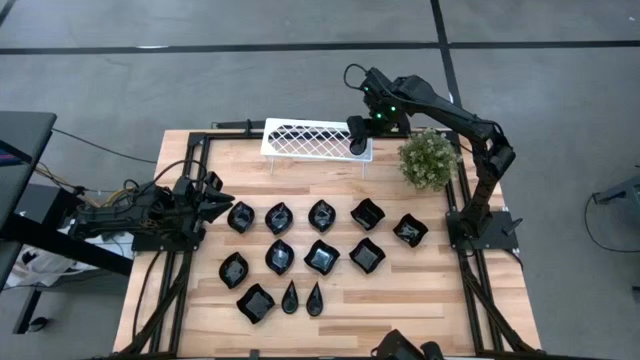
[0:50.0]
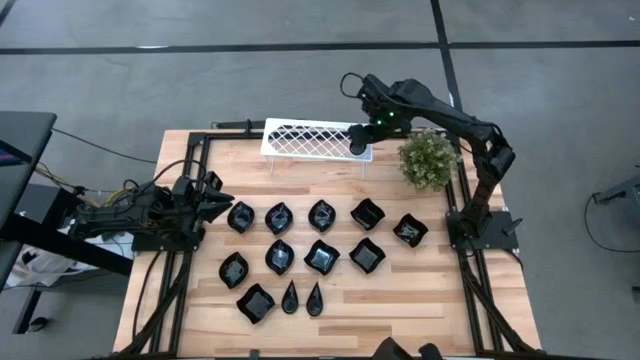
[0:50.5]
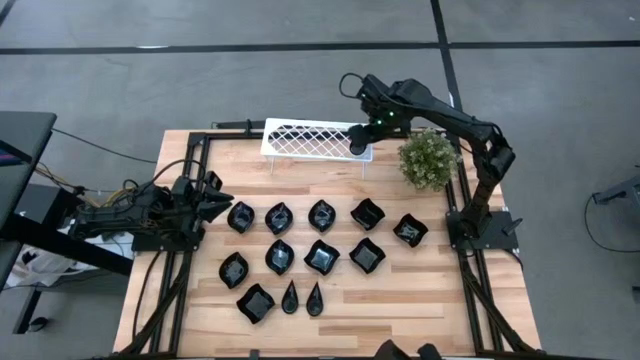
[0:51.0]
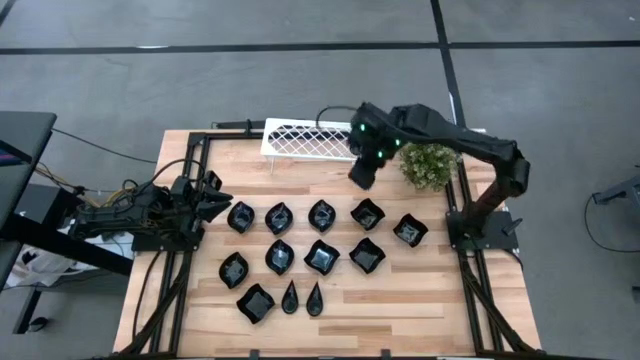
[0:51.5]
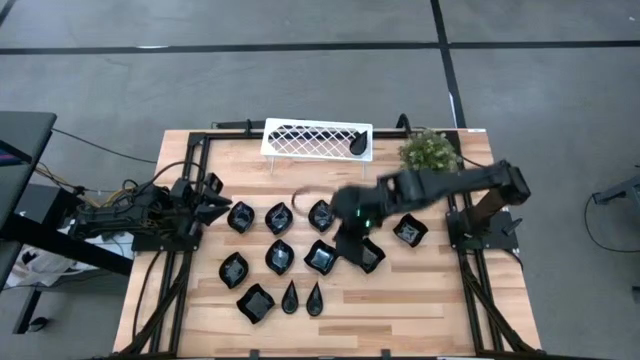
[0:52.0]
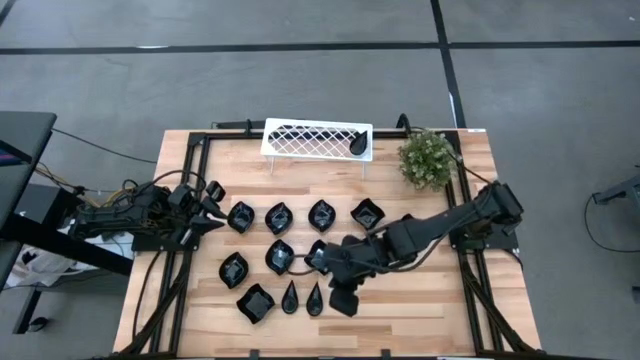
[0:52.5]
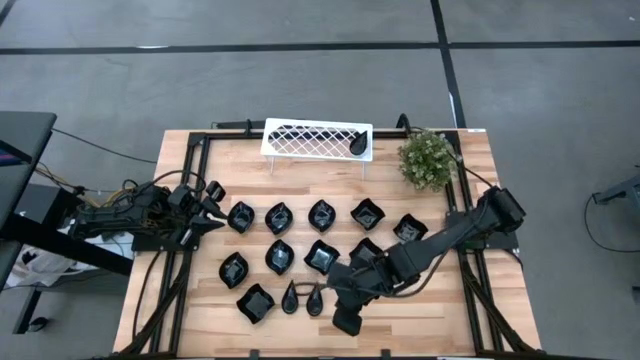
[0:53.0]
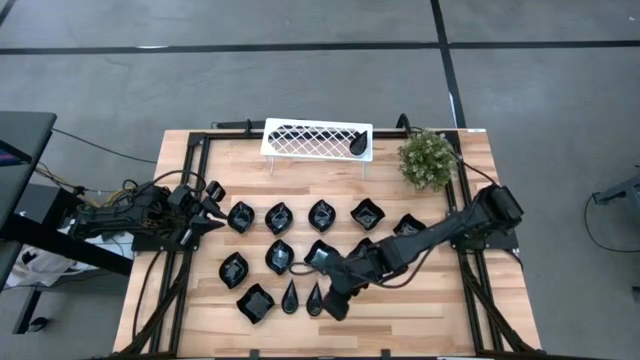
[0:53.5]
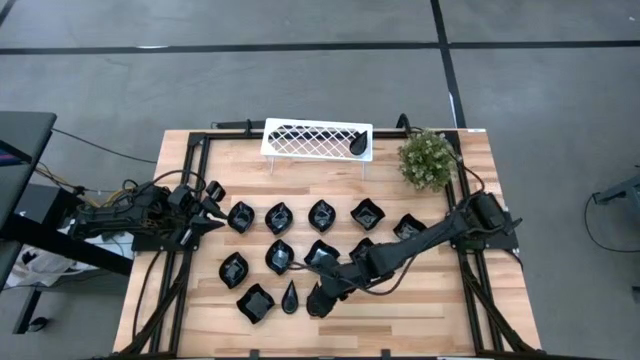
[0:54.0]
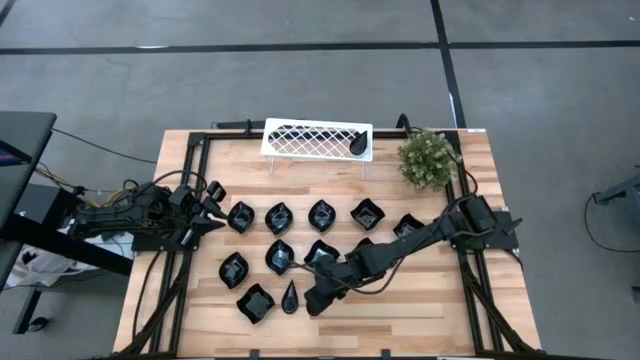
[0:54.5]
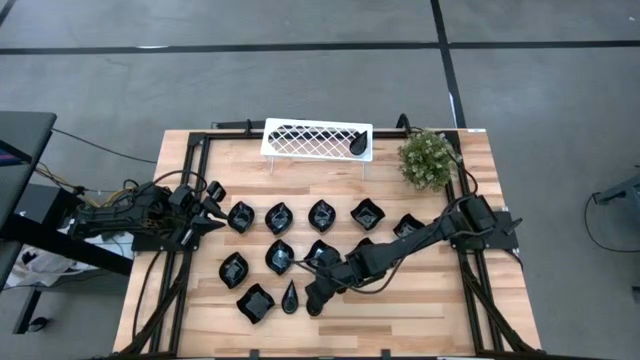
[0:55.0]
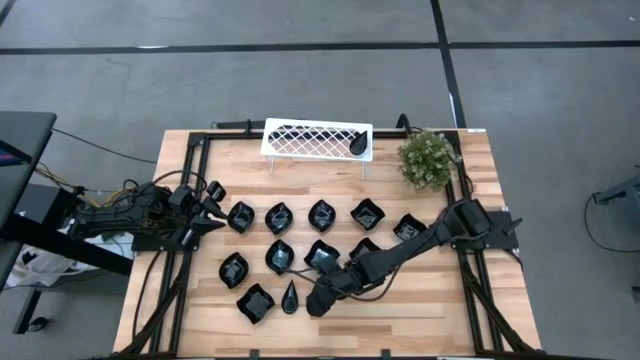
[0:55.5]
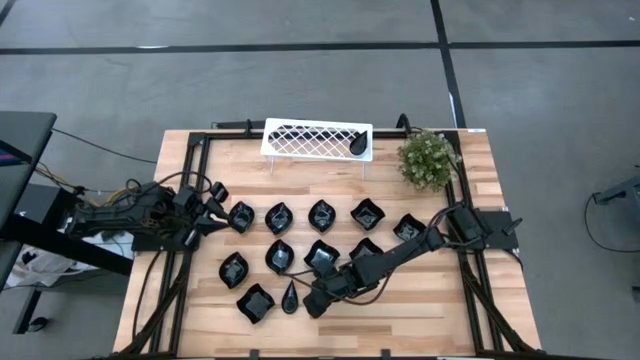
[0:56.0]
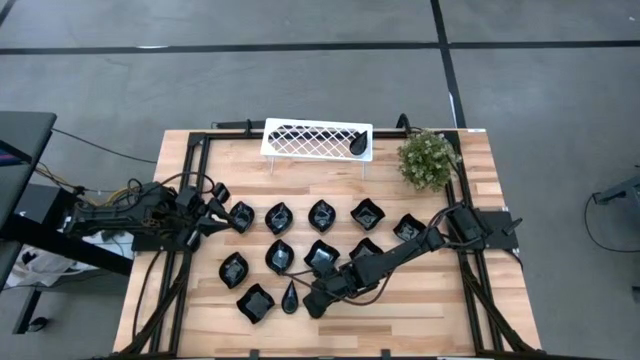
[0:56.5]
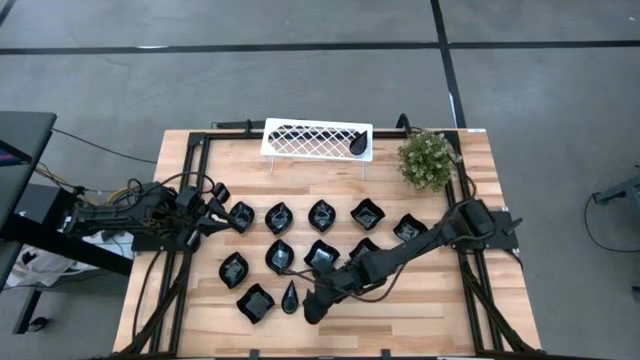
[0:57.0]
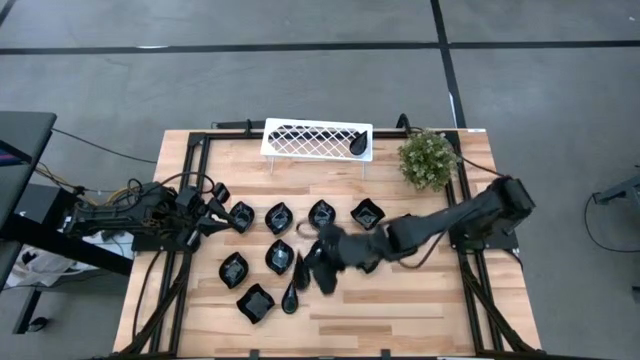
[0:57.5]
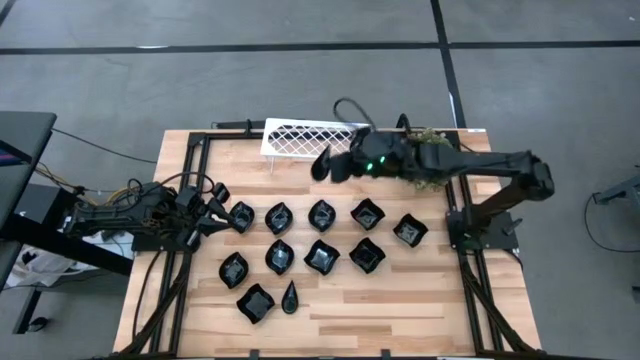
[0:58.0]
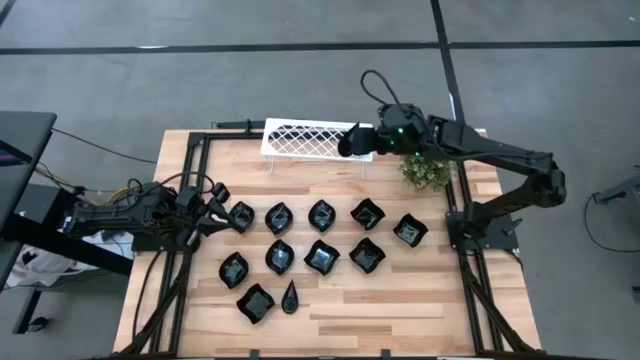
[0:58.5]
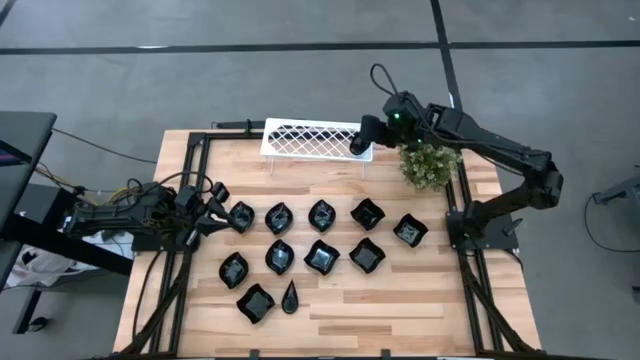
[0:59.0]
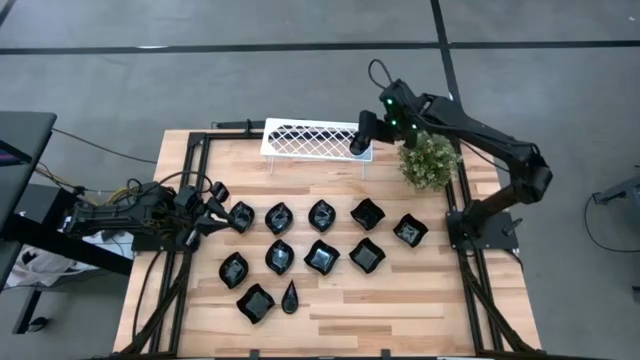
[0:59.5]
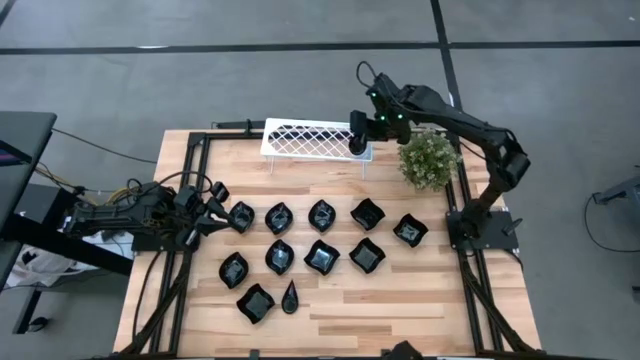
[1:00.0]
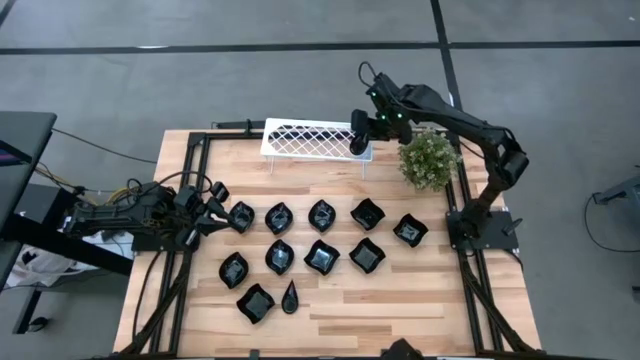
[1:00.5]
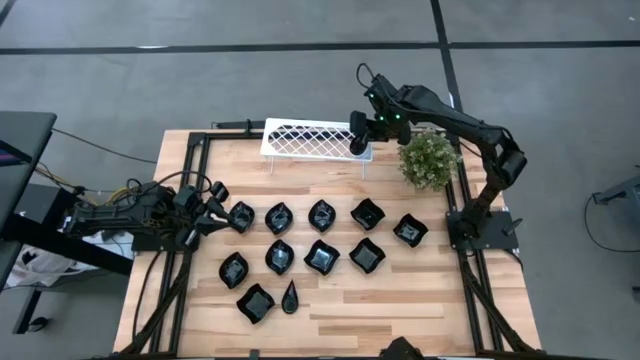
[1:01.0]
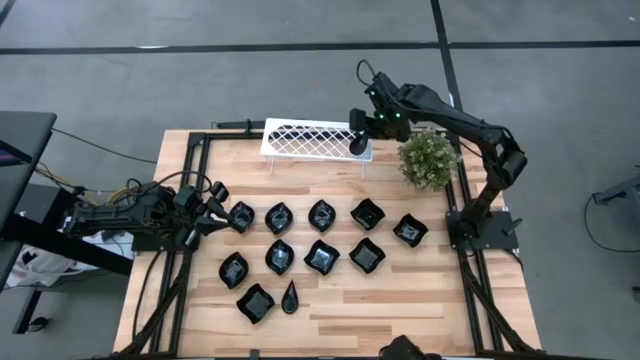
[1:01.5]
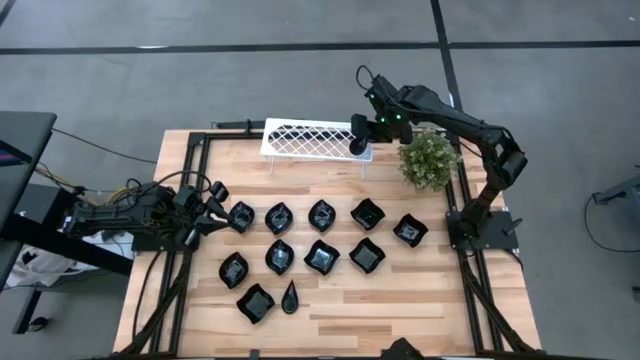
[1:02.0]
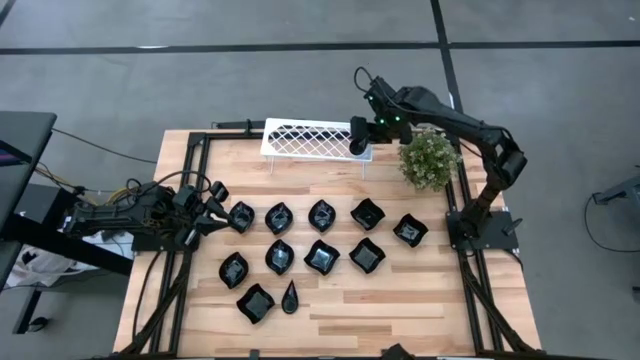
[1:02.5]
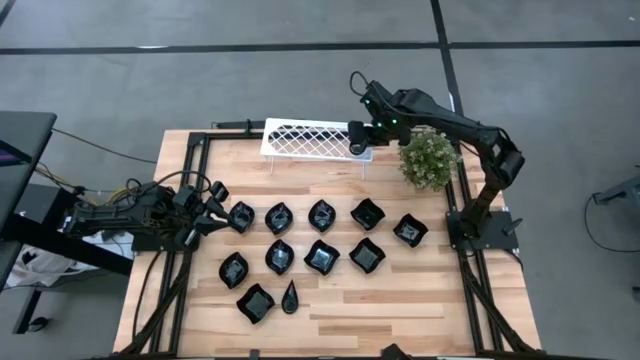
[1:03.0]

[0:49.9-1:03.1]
Task: Pick & Place Mini shaped plates
Stack the black drop shaped plate on top of the black drop shaped plate on the shelf

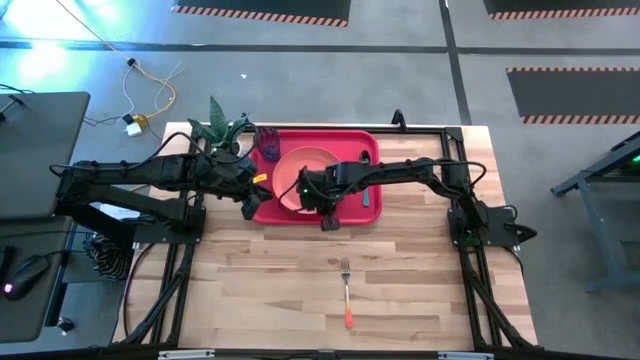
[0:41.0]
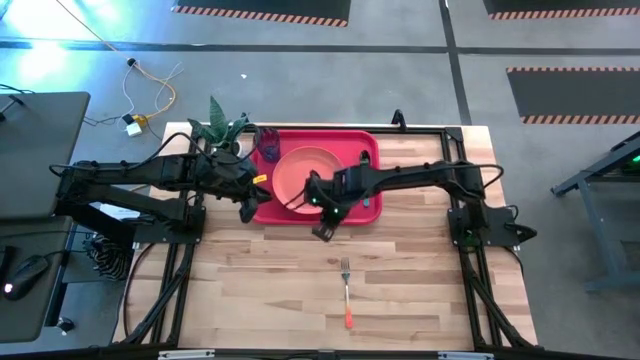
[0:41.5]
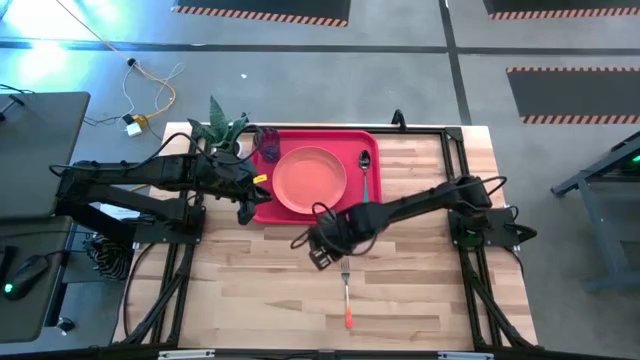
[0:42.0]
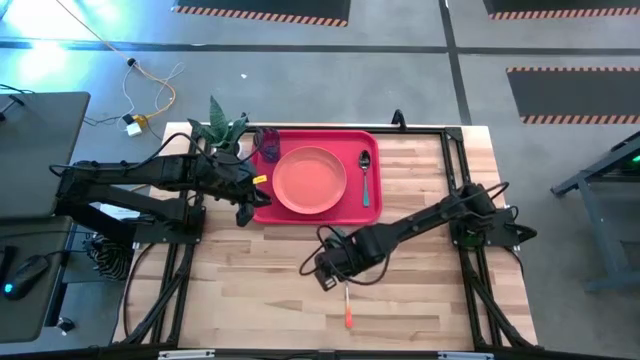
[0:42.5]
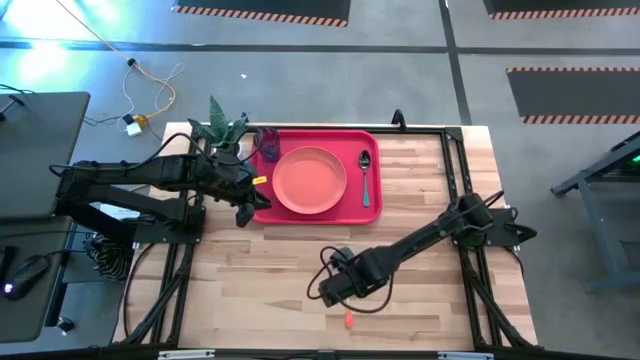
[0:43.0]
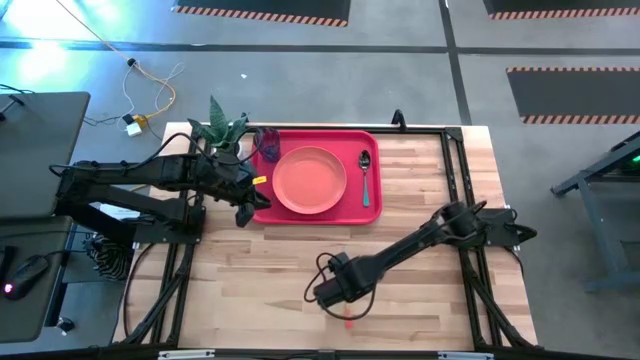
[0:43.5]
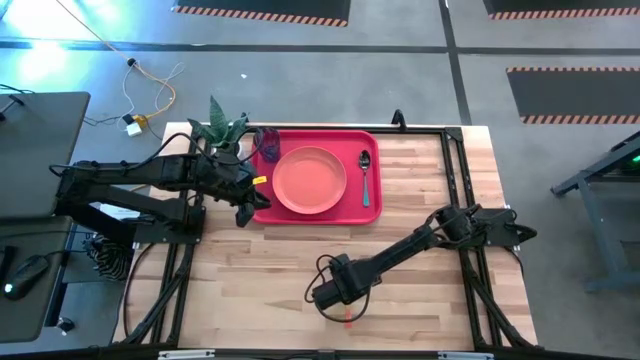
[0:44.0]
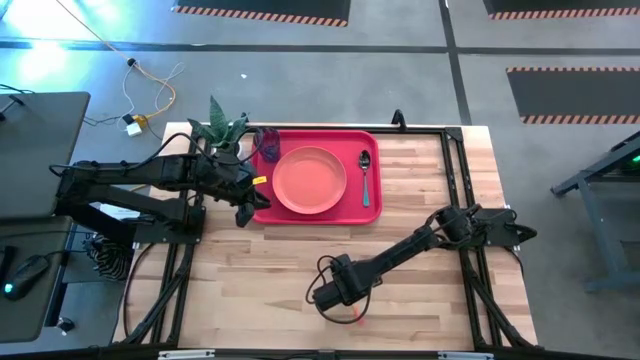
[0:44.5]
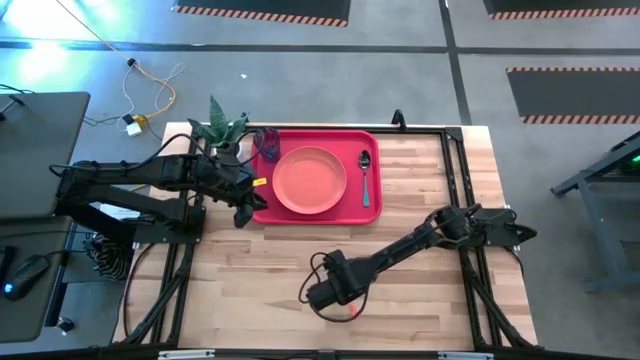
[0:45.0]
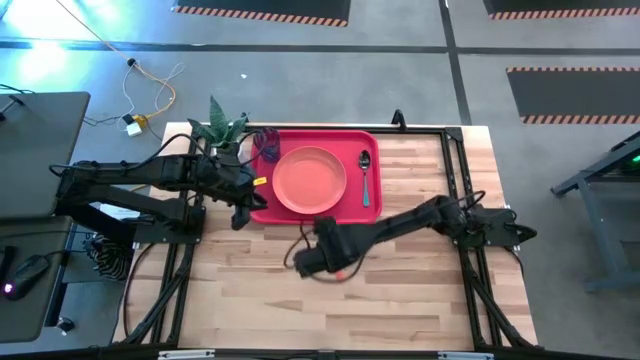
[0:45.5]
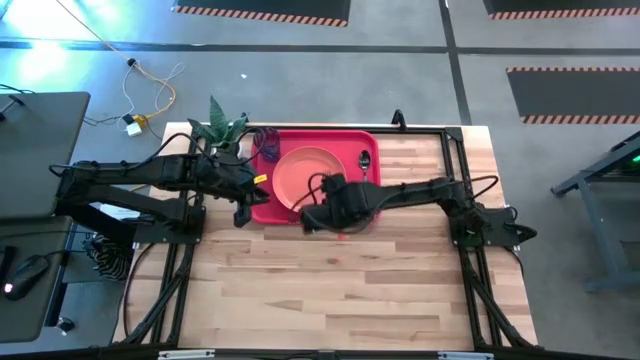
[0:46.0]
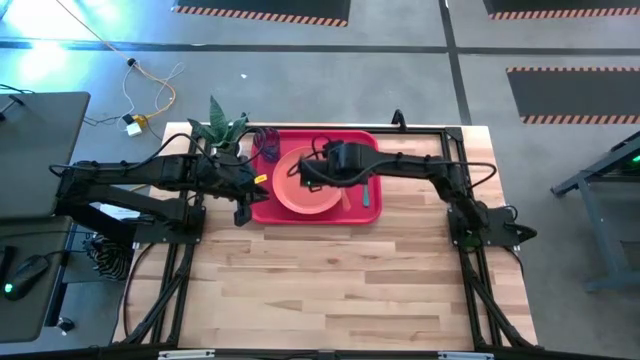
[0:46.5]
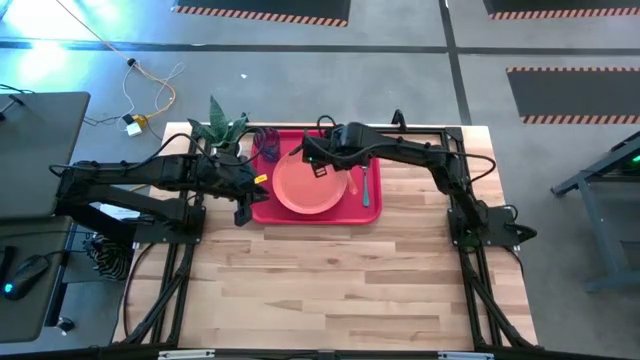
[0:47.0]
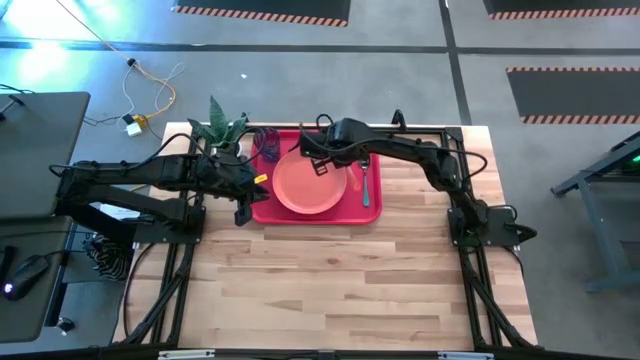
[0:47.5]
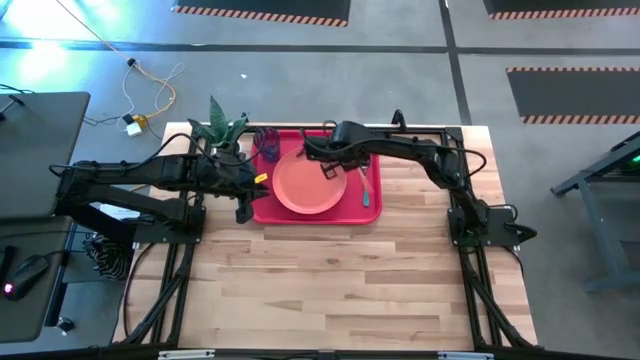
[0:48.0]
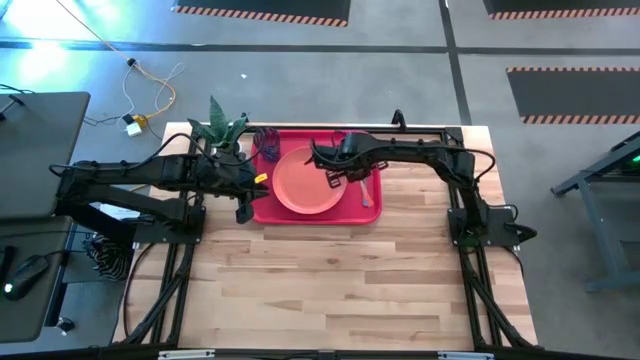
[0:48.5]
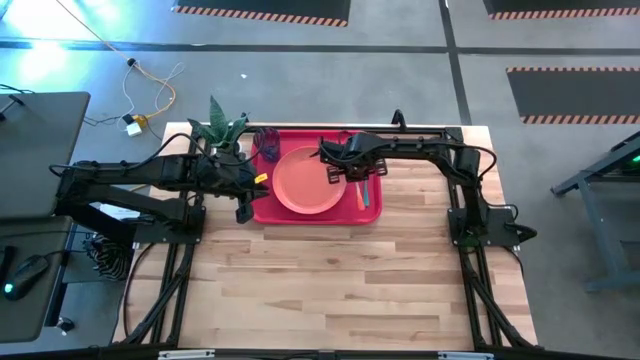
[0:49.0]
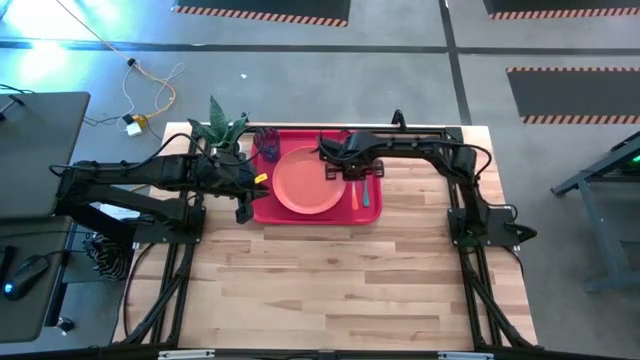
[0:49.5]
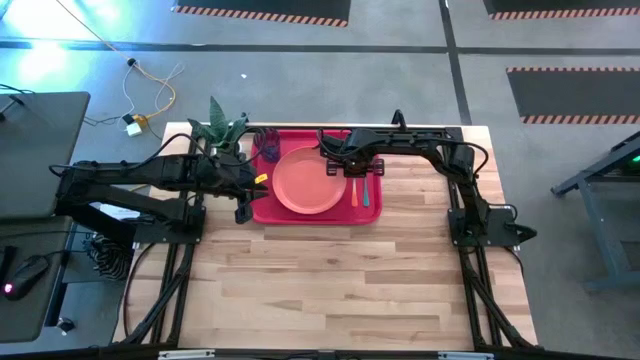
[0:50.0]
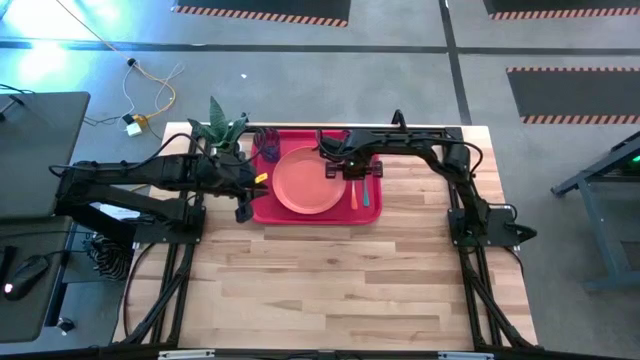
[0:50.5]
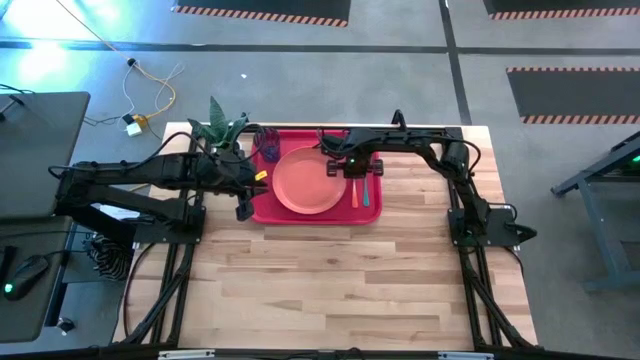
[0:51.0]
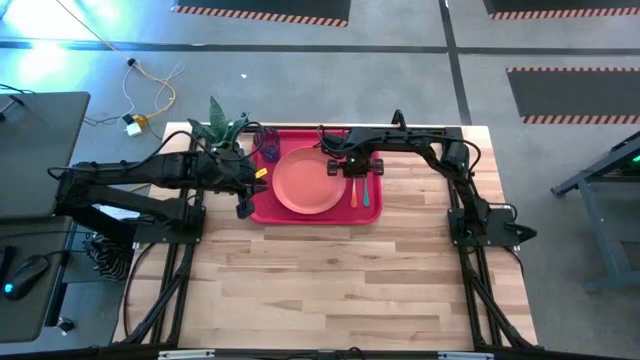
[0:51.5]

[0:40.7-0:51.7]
Task: Pick and place plate/cup/fork/spoon on tray
Put the orange fork on the red serving tray to the right side of the pink plate
